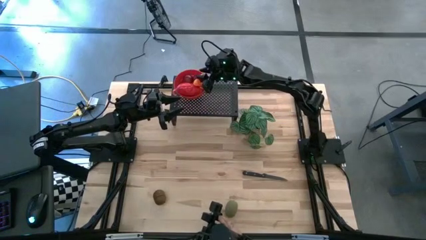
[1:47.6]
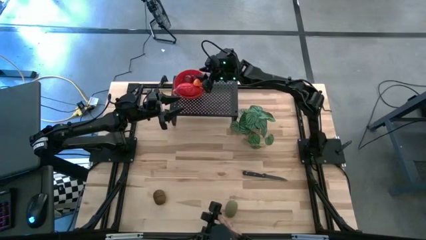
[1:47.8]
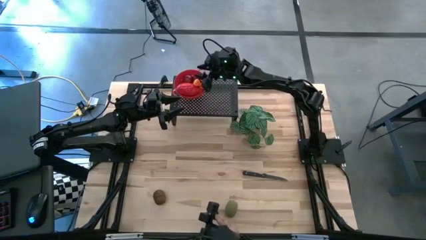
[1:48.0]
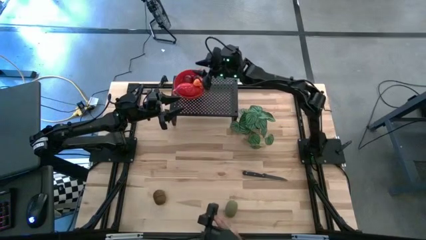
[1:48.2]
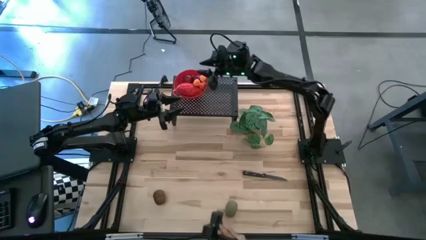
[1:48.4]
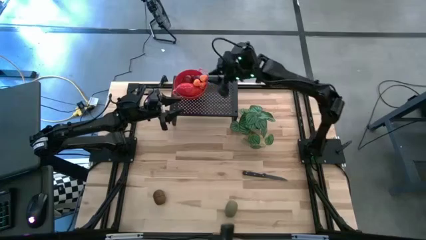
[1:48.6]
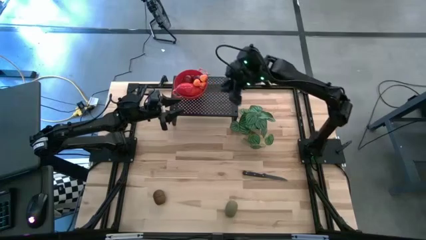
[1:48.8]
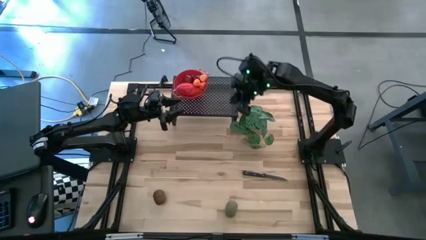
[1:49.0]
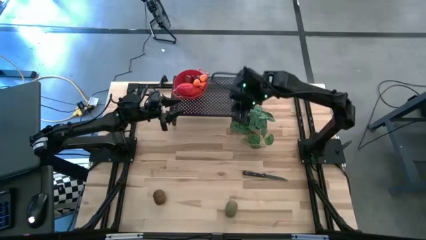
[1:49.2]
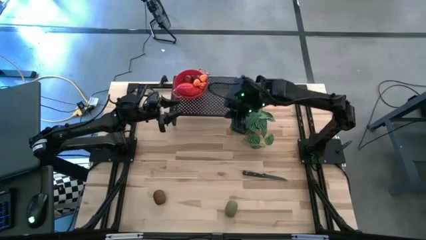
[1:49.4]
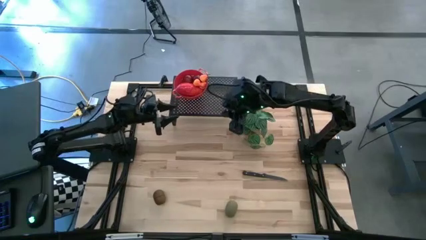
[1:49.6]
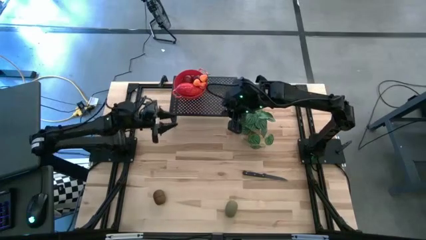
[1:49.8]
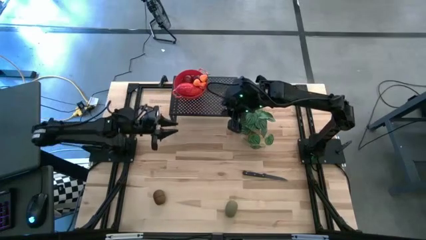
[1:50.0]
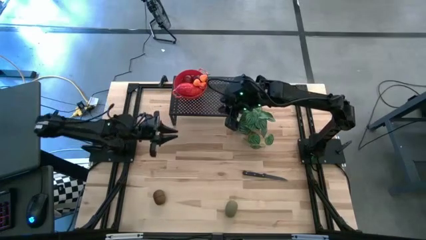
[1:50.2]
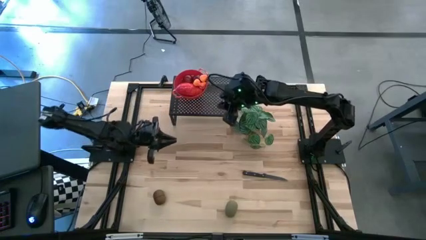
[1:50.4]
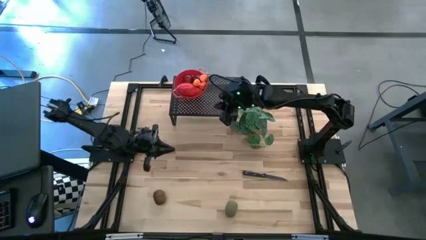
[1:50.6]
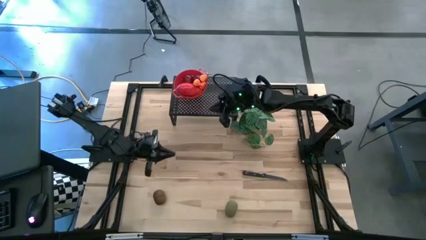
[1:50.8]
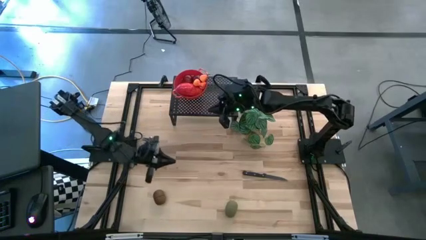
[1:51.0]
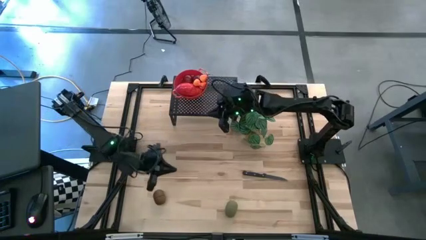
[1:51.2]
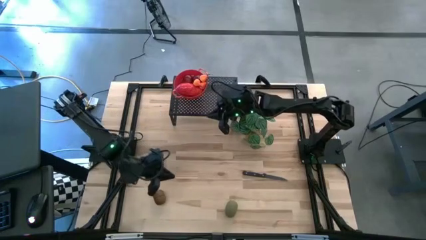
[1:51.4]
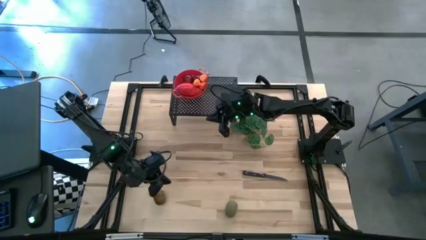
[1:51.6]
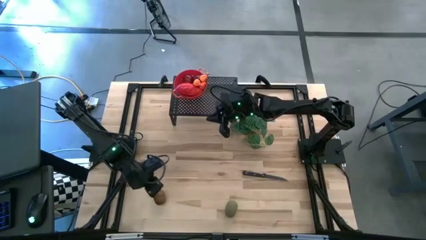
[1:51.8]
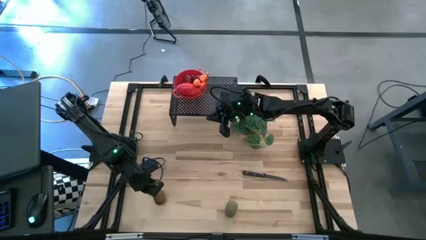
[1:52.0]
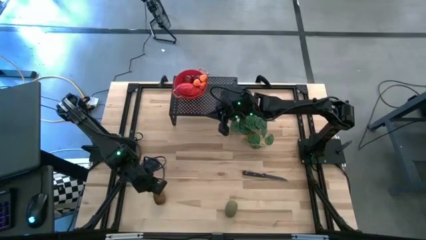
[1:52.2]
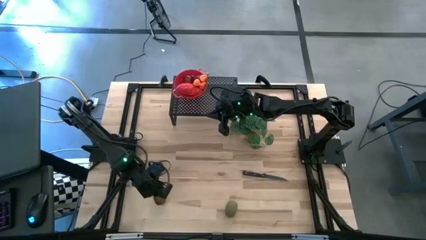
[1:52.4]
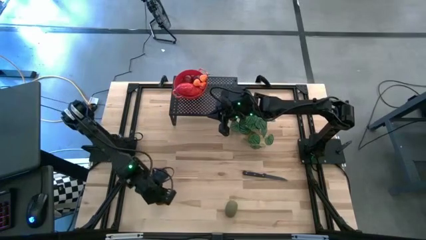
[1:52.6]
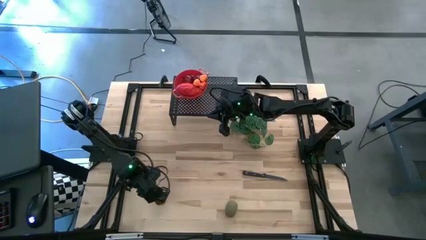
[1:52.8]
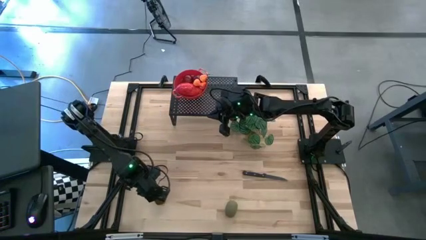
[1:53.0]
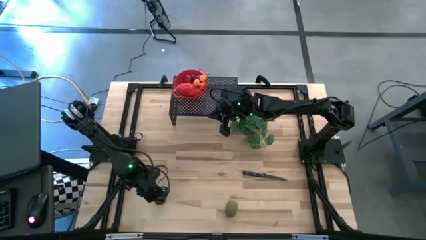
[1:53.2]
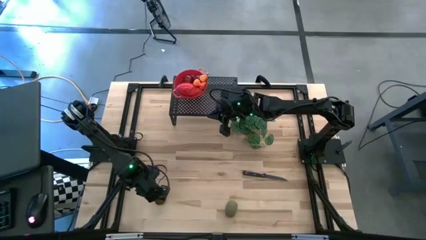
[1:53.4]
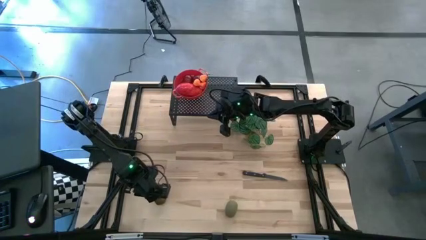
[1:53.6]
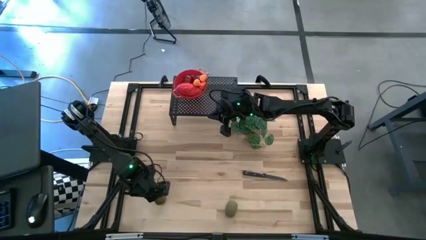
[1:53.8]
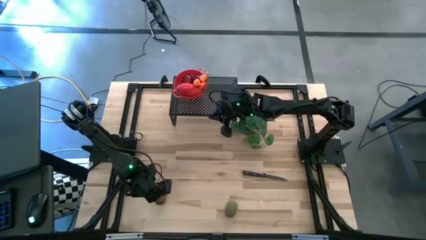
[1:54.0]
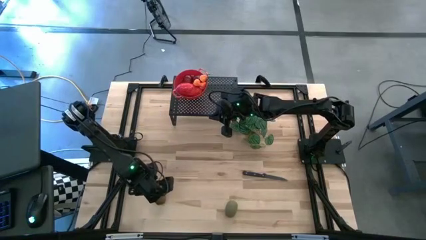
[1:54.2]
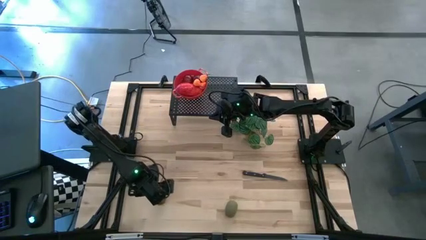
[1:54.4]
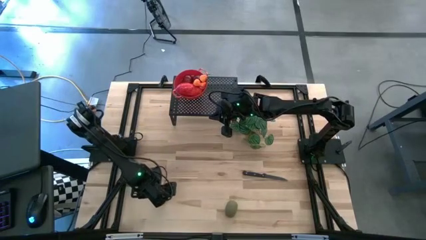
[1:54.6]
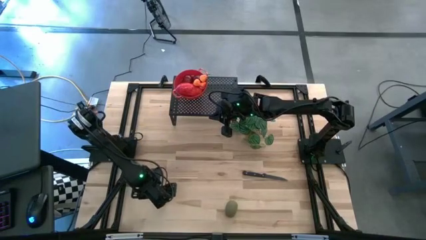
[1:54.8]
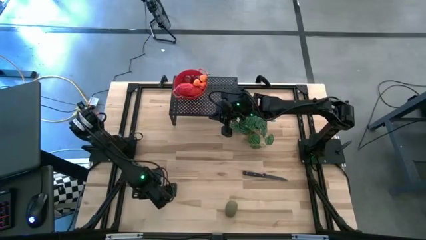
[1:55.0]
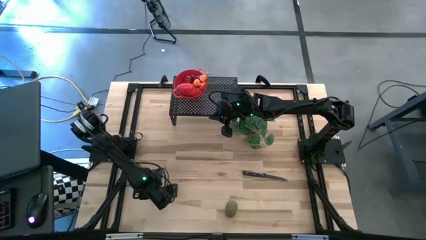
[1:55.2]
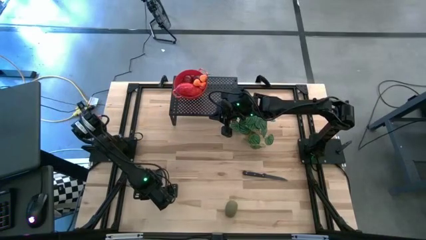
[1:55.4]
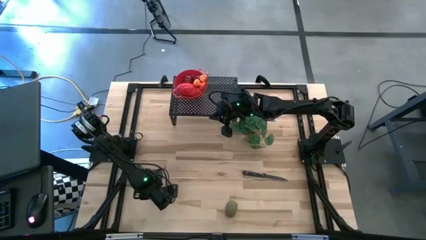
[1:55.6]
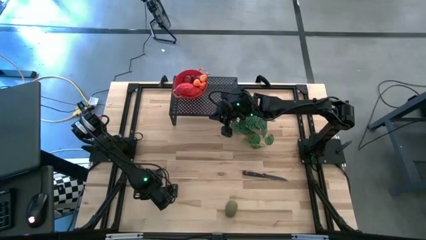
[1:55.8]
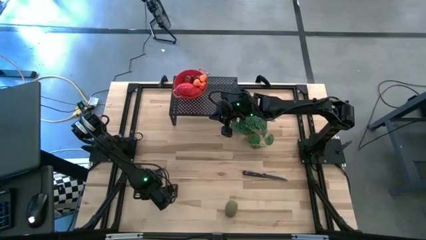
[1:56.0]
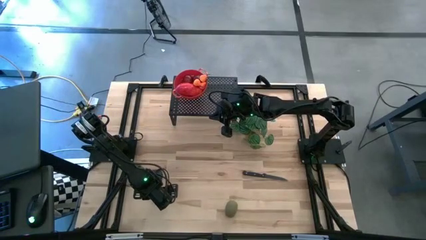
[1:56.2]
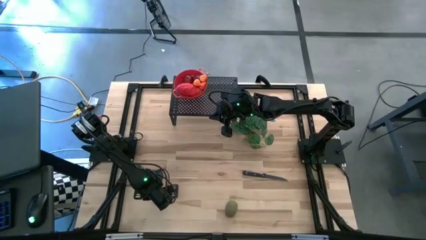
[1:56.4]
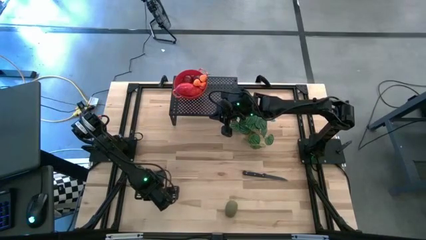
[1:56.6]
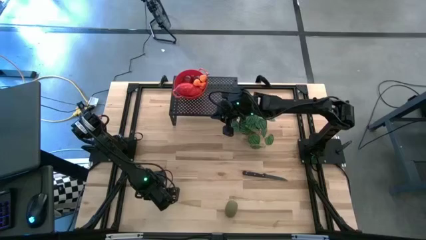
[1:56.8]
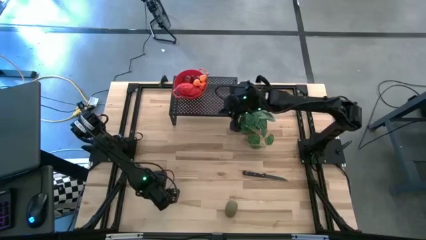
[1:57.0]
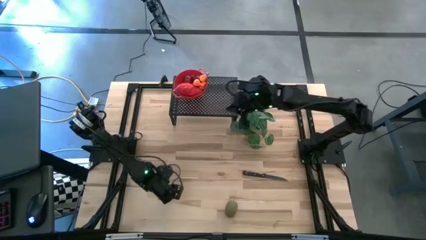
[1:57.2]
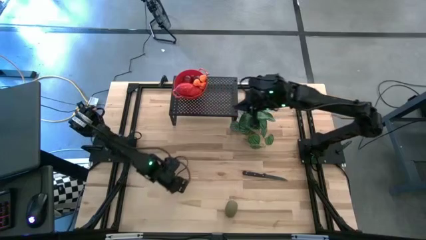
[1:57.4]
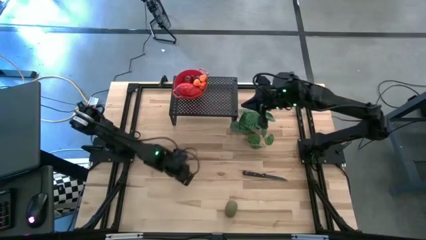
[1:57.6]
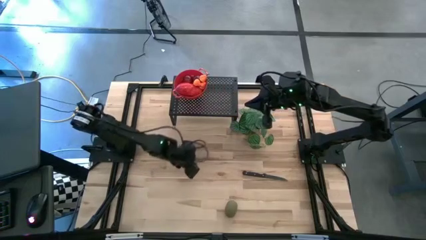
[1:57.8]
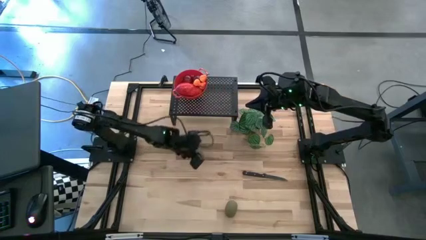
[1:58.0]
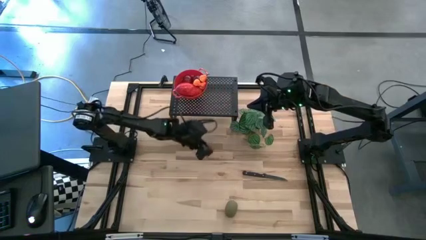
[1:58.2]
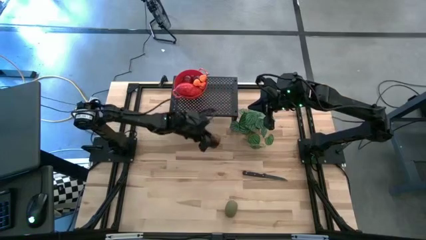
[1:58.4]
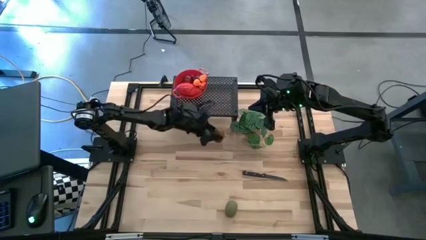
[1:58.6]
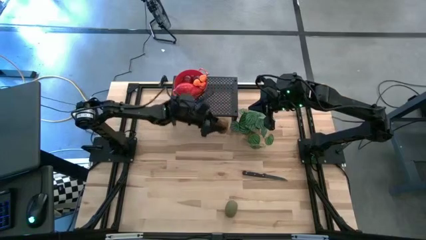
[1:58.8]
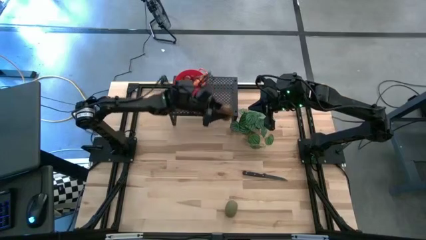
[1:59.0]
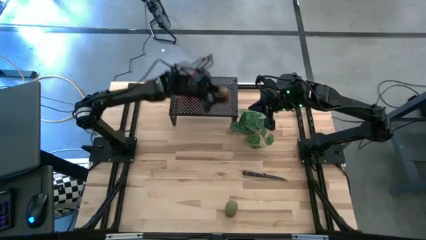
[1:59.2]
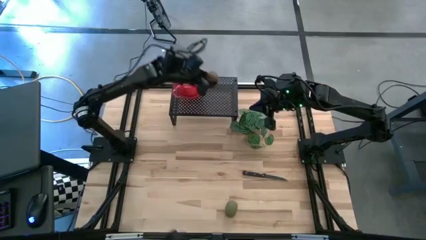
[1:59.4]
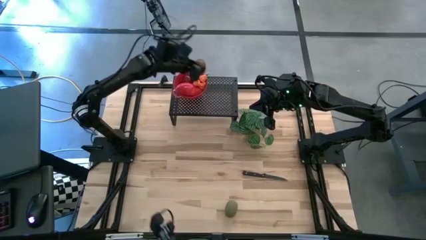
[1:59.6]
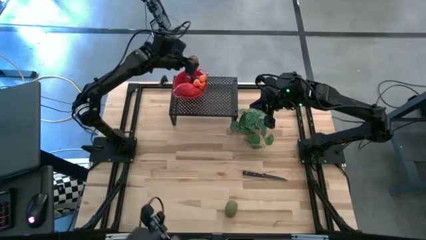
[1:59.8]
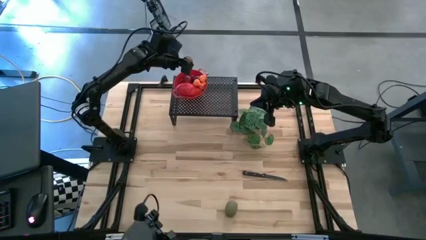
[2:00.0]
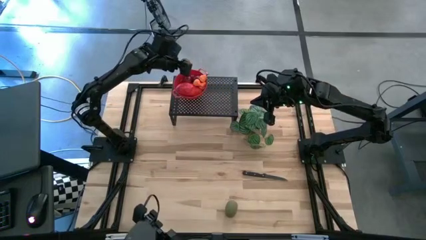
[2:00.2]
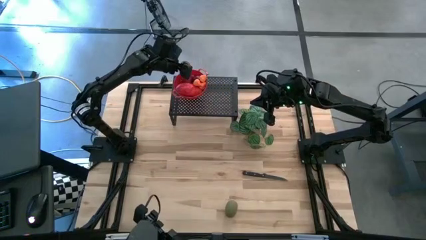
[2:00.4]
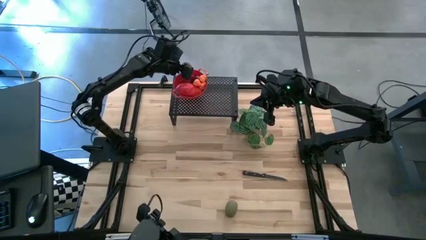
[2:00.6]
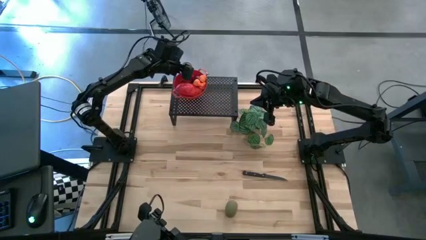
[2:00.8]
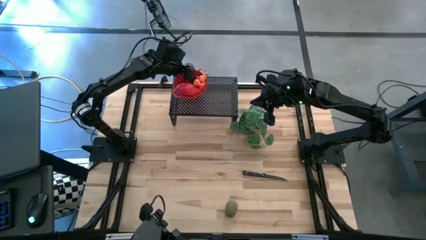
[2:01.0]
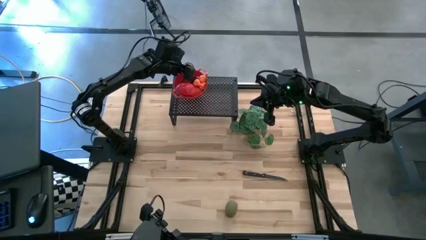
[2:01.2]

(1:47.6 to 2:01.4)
Task: Pick & Place Fruit
Put the left brown kiwi in the red strainer bowl on the shelf
